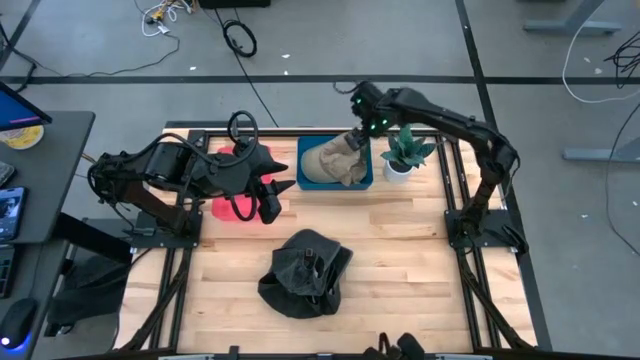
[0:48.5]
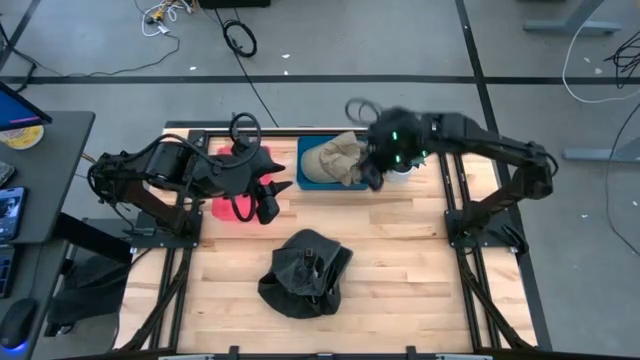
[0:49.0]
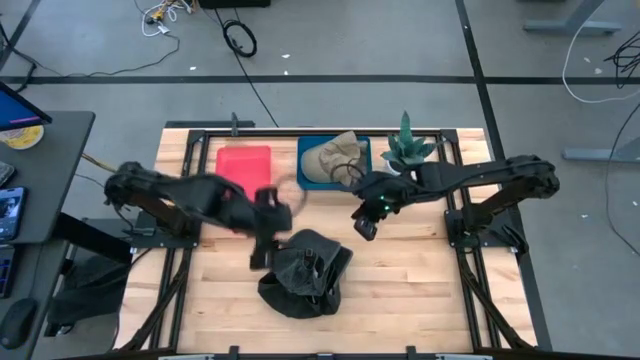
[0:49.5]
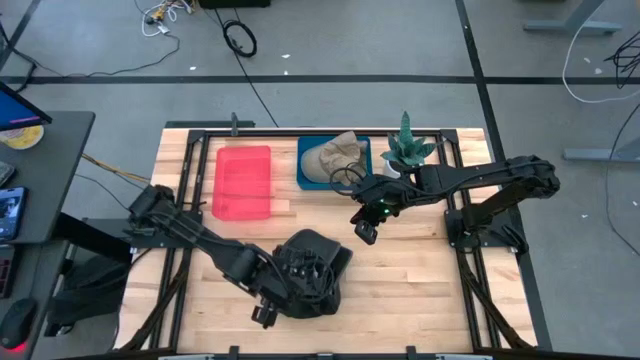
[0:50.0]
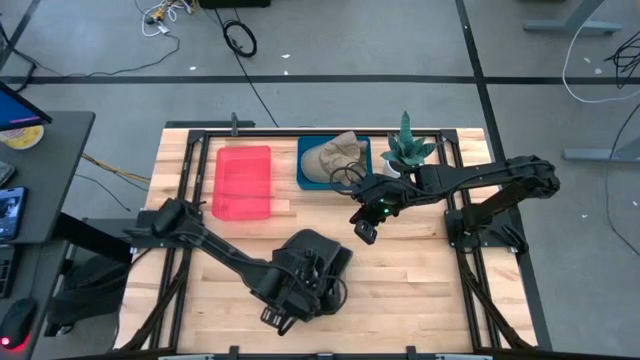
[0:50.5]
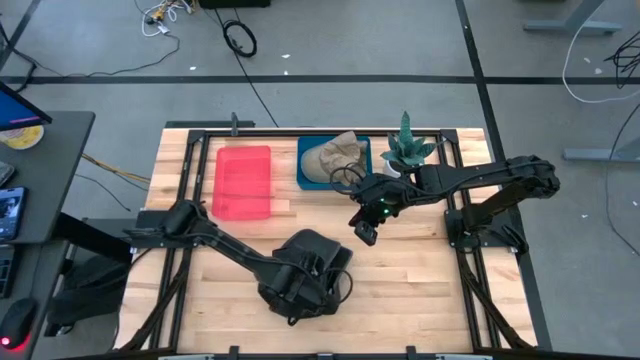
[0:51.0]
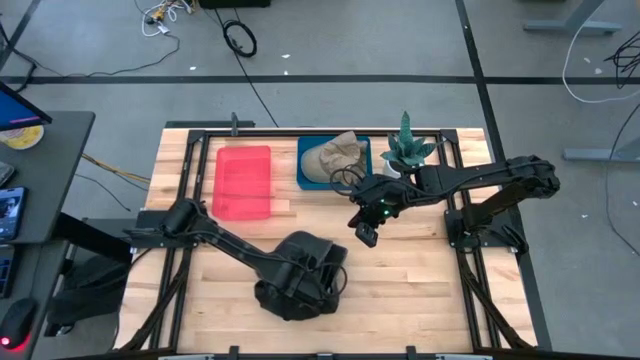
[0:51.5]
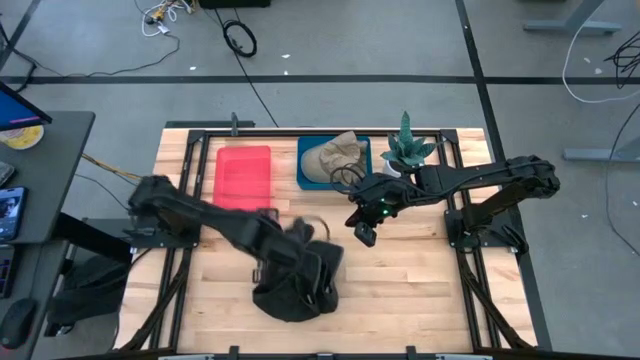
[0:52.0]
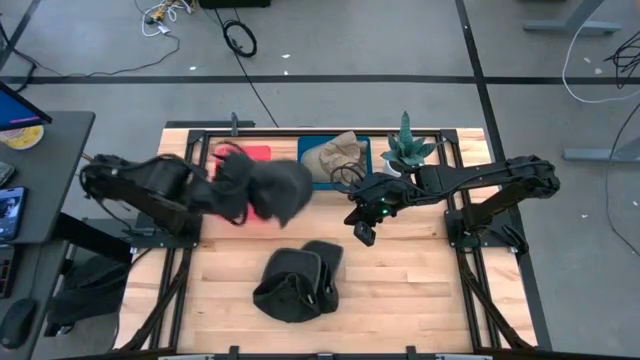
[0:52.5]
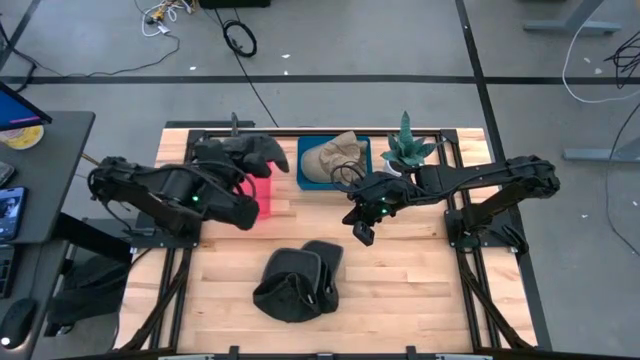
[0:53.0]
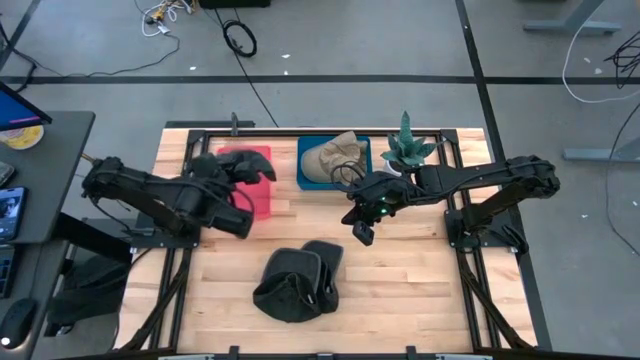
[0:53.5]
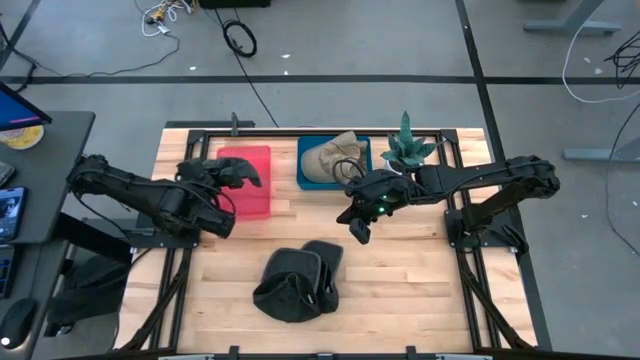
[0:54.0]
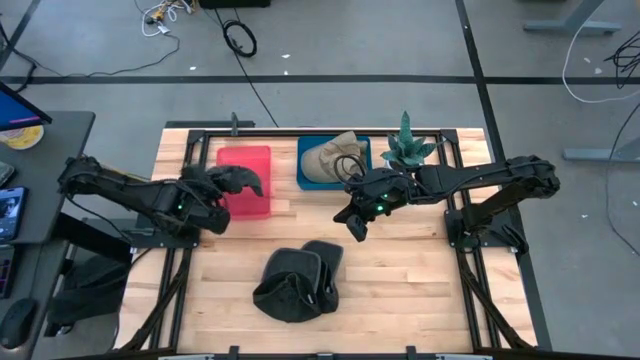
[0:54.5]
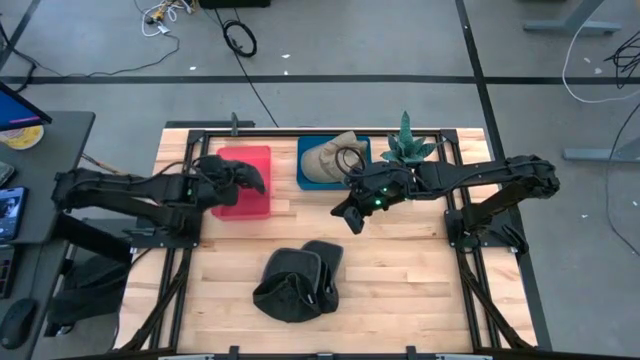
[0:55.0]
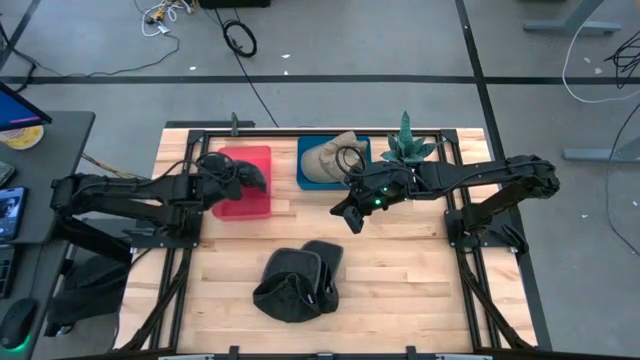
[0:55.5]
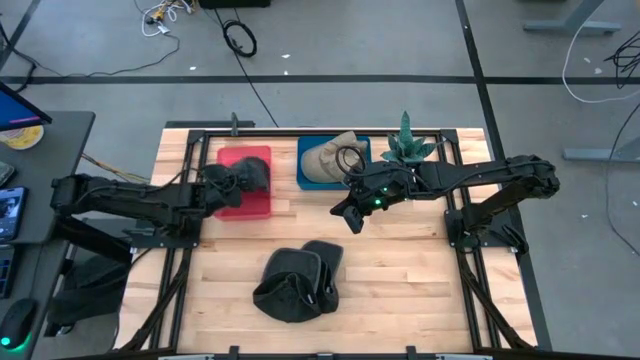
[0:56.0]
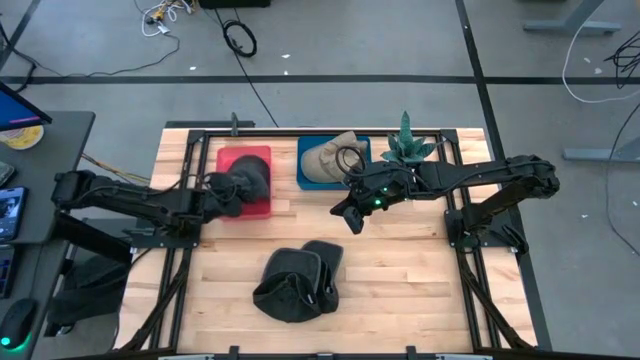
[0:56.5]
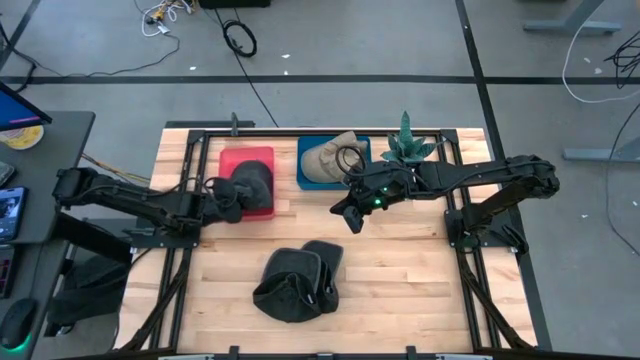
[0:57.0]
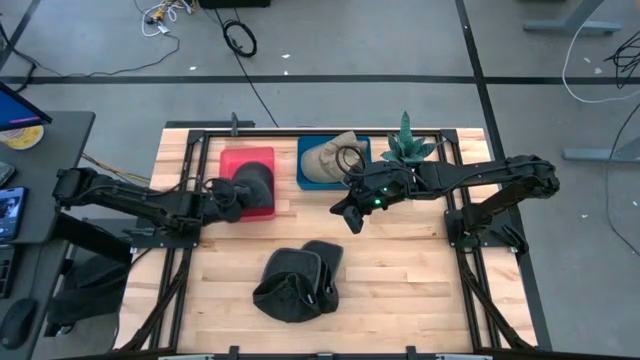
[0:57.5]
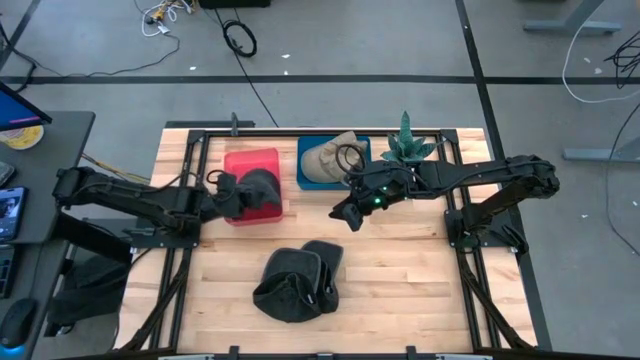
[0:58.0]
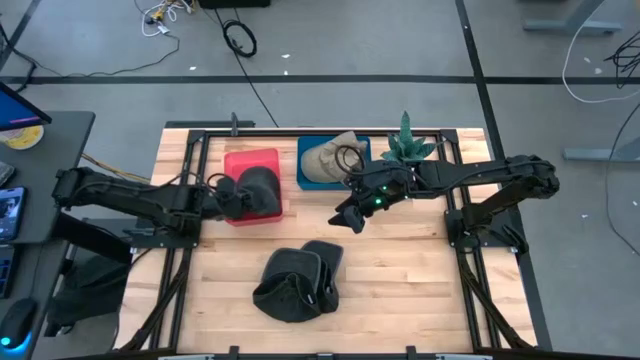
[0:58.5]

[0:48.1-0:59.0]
Task: Pick & Place hat
Put the top black cap into the red bin

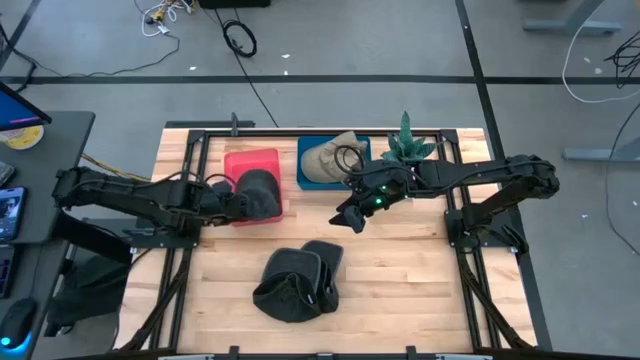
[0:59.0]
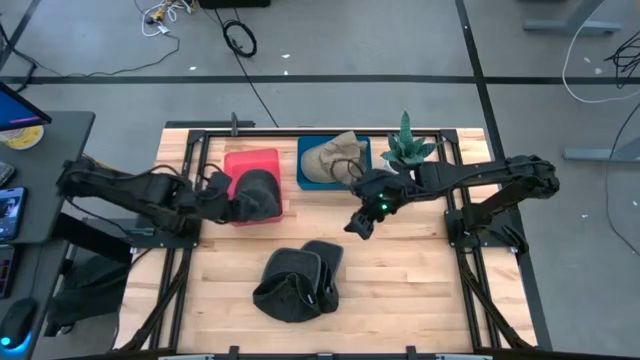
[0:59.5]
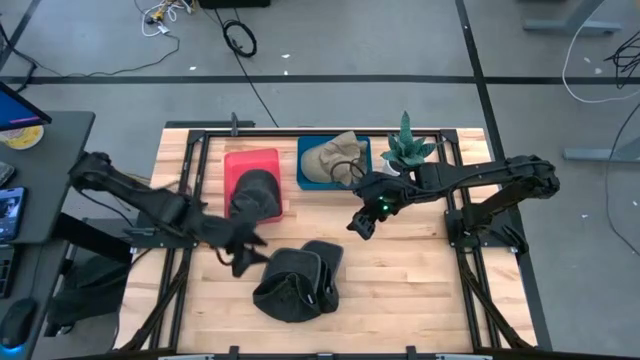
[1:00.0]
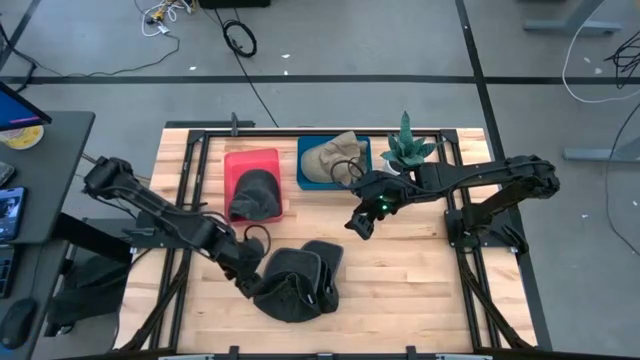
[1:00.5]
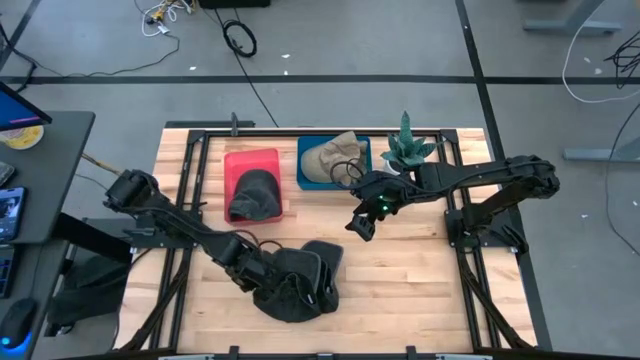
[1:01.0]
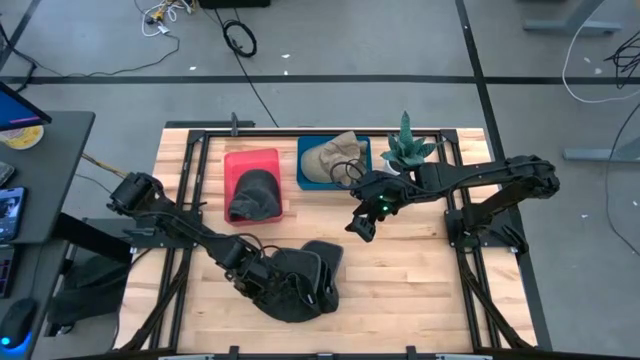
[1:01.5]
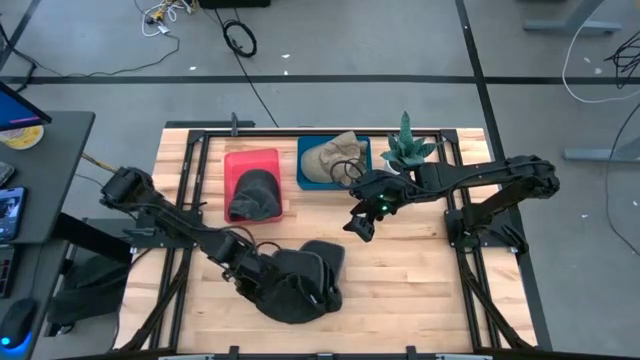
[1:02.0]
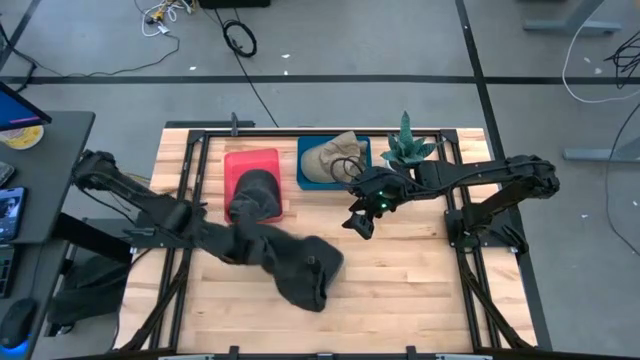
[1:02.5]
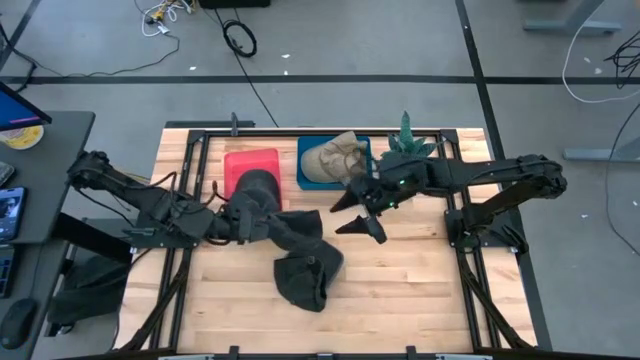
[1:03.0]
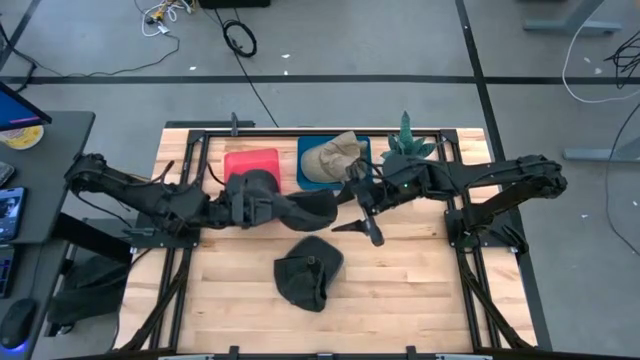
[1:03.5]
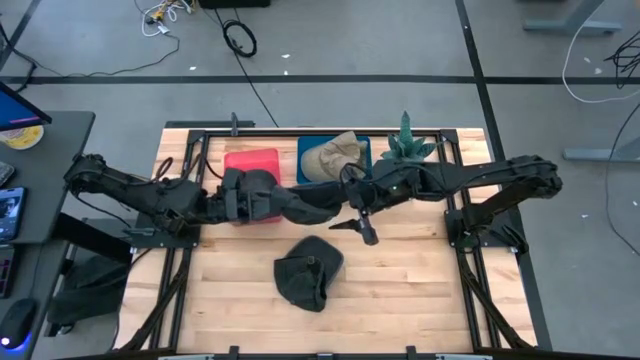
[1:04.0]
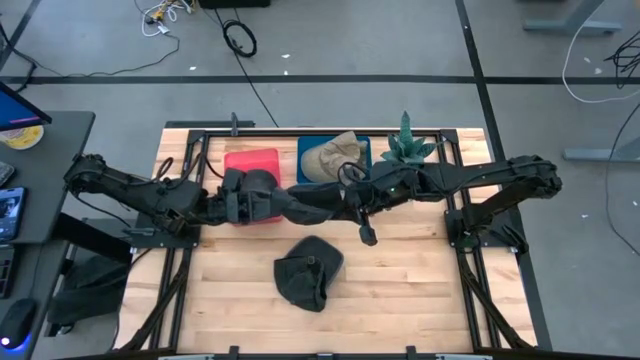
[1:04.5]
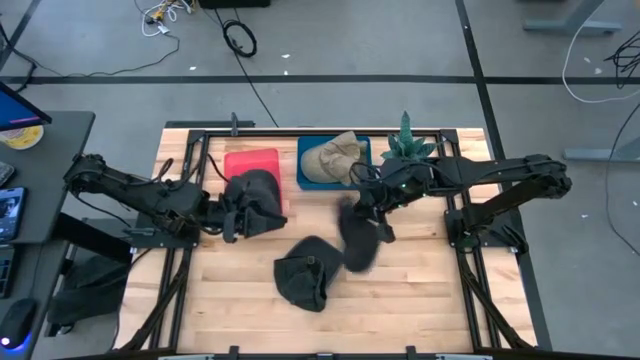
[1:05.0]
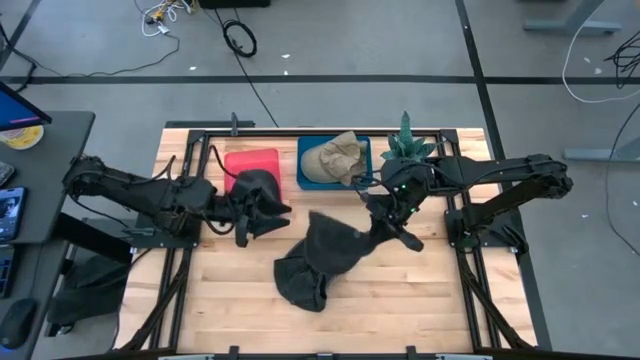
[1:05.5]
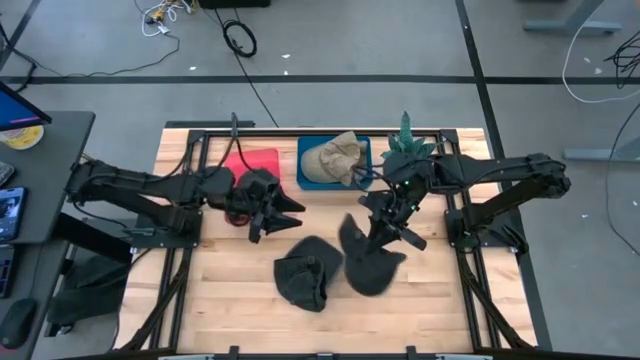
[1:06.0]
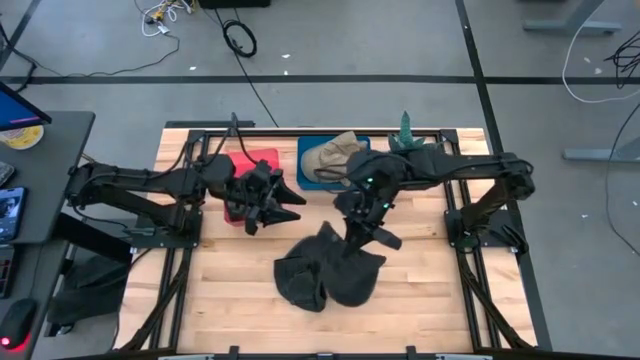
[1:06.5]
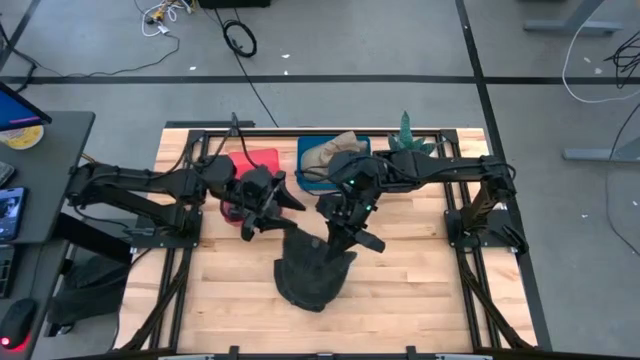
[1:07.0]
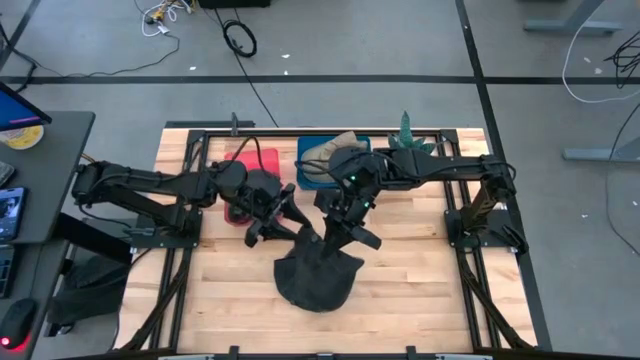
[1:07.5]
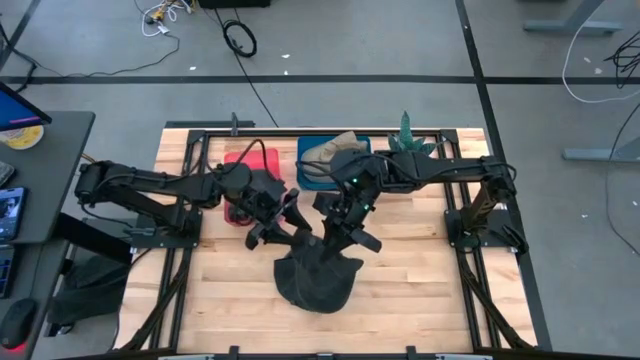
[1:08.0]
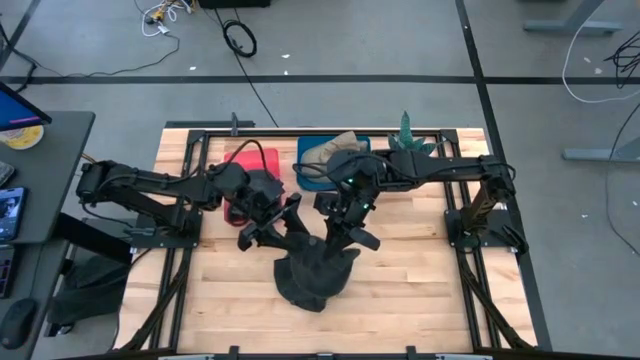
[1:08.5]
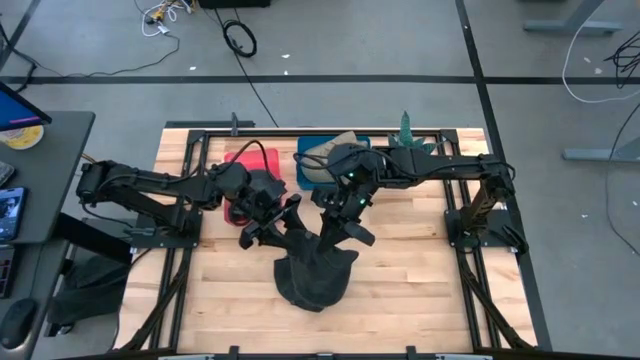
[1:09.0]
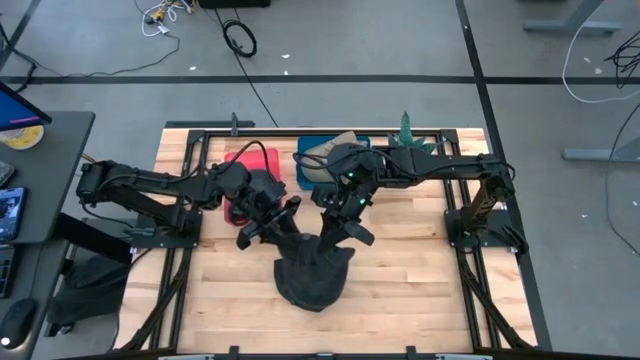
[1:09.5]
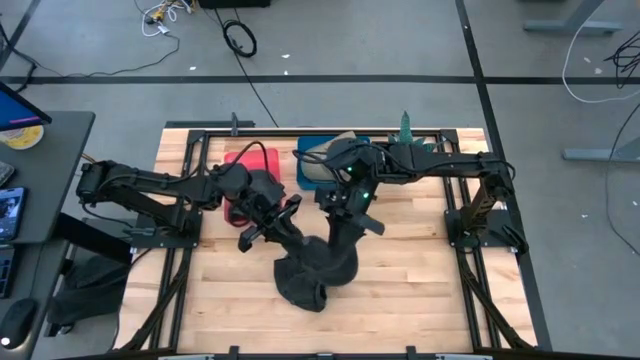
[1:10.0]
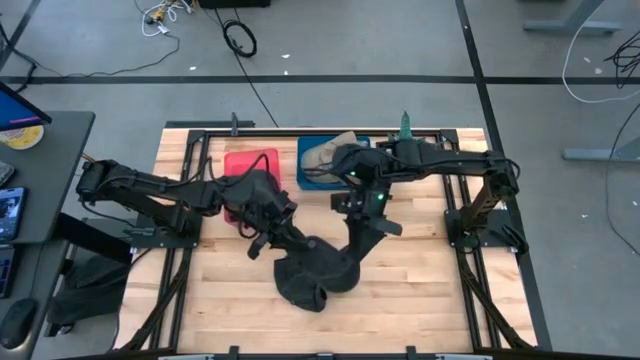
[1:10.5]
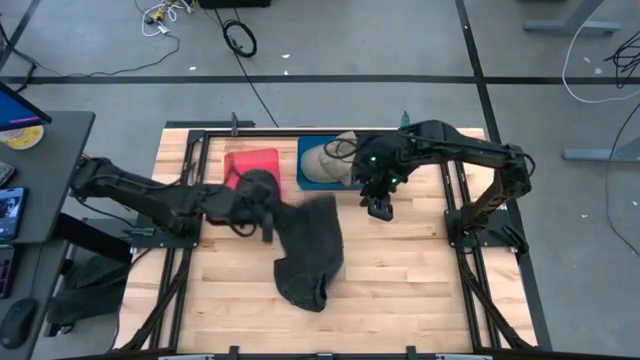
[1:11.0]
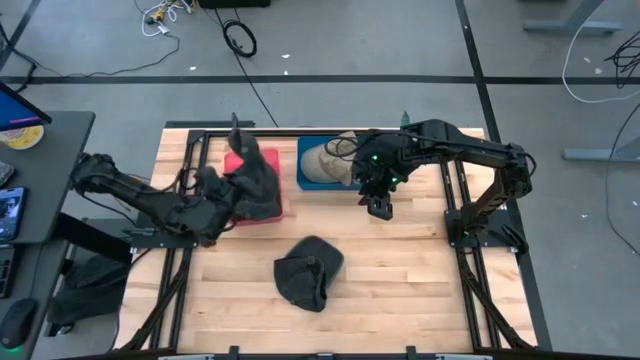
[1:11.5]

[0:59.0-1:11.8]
Put the top black cap into the red bin
